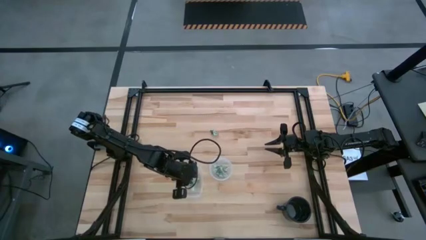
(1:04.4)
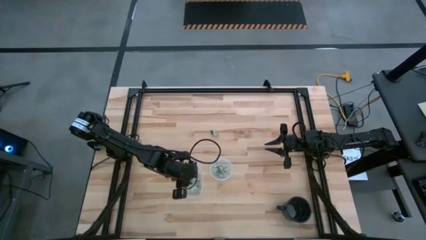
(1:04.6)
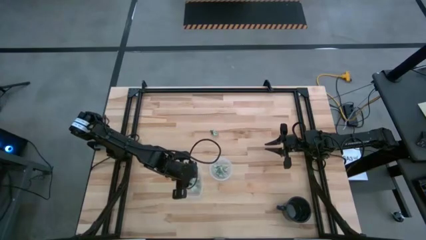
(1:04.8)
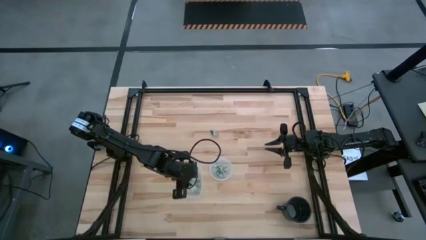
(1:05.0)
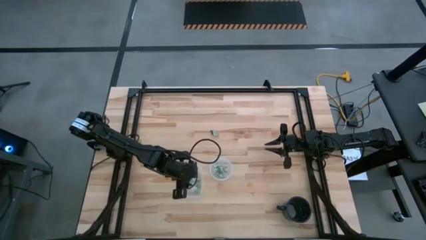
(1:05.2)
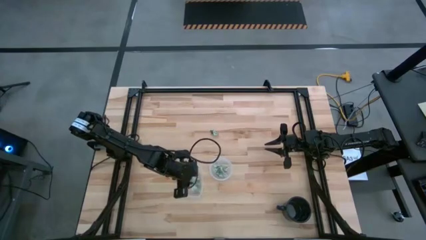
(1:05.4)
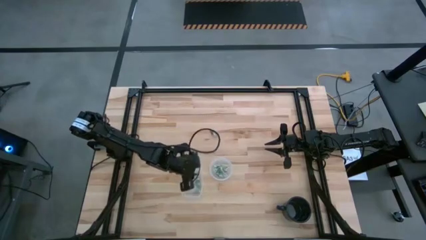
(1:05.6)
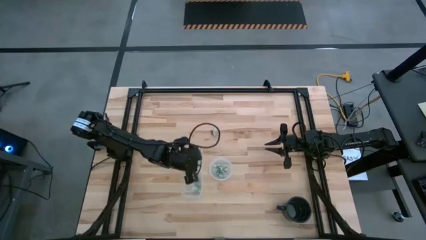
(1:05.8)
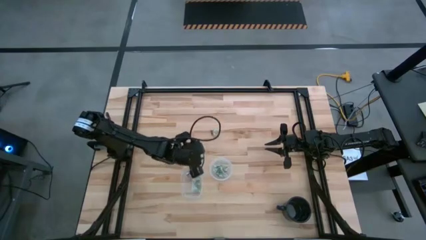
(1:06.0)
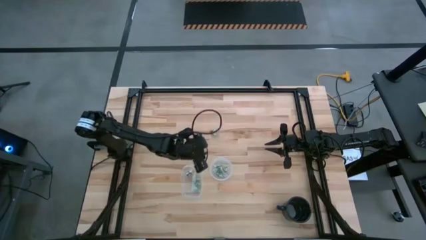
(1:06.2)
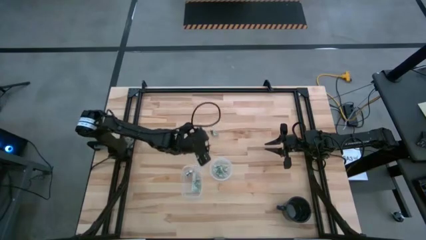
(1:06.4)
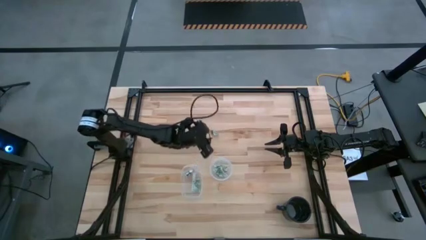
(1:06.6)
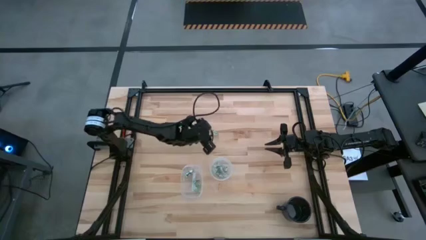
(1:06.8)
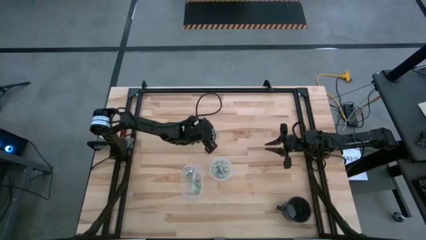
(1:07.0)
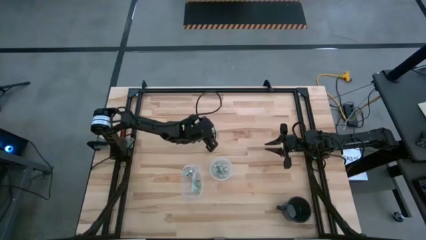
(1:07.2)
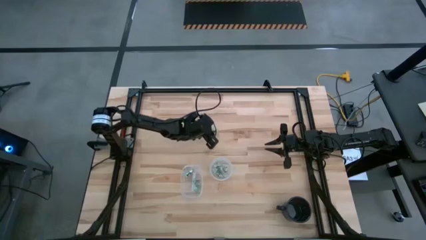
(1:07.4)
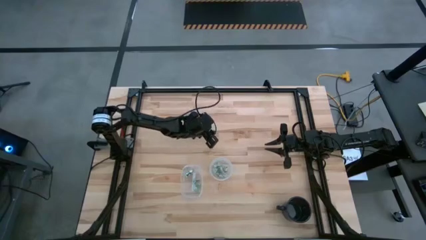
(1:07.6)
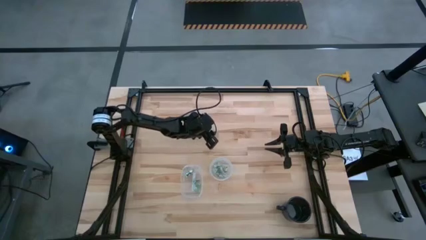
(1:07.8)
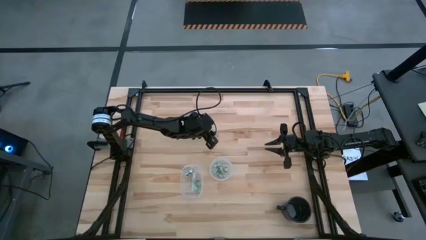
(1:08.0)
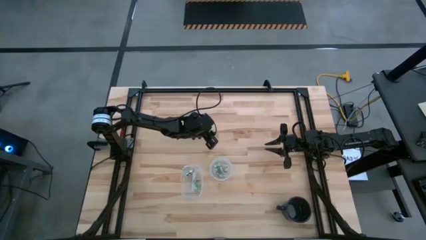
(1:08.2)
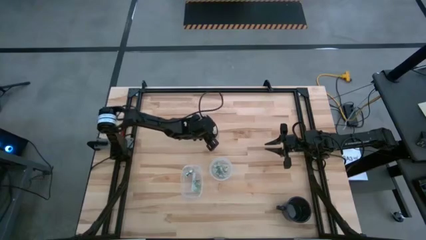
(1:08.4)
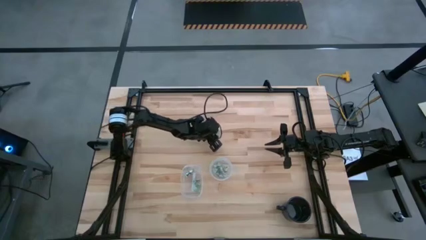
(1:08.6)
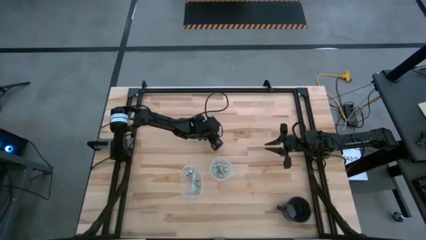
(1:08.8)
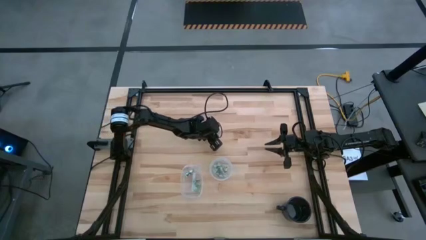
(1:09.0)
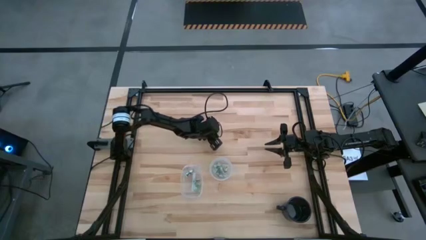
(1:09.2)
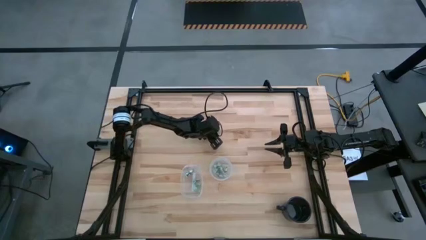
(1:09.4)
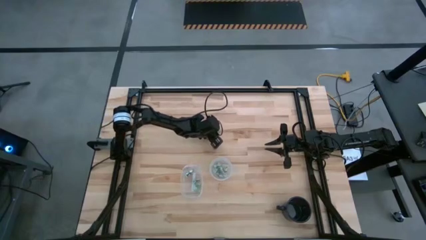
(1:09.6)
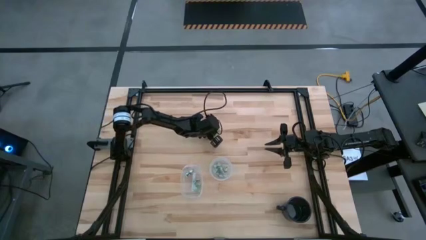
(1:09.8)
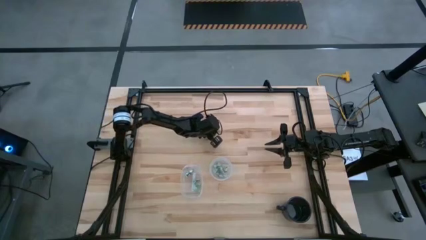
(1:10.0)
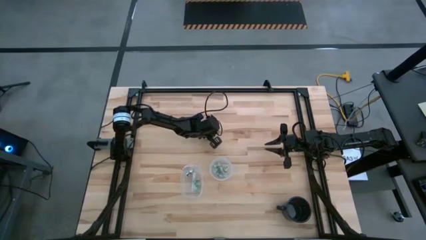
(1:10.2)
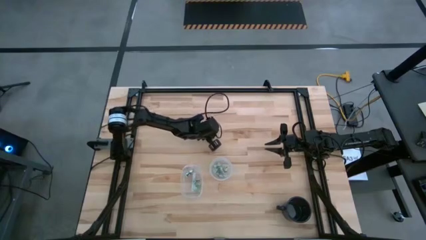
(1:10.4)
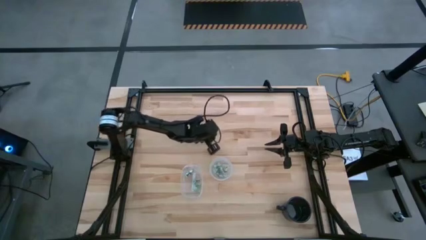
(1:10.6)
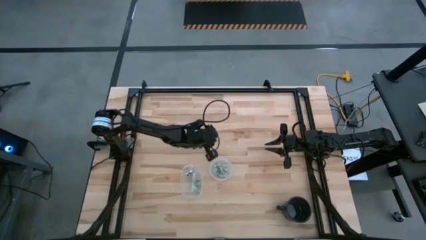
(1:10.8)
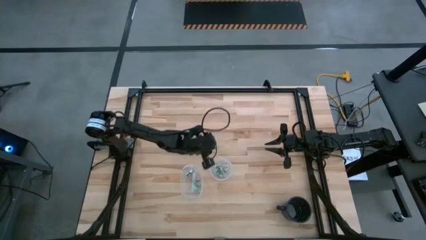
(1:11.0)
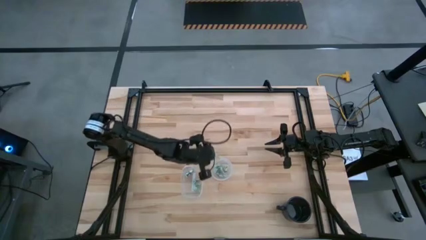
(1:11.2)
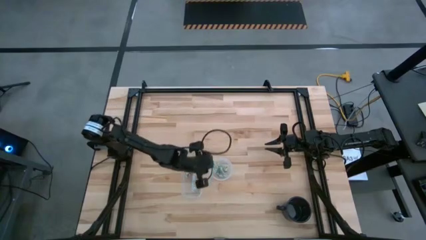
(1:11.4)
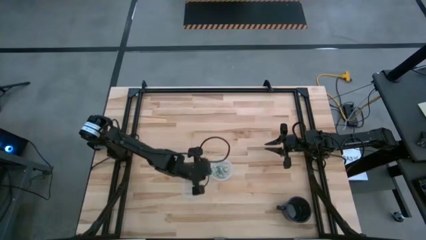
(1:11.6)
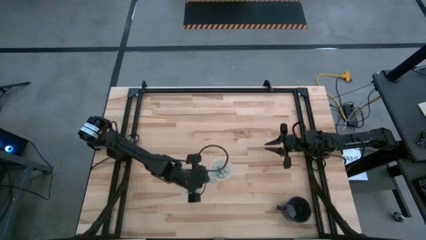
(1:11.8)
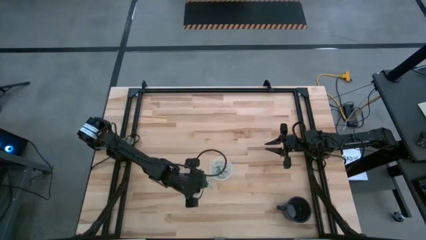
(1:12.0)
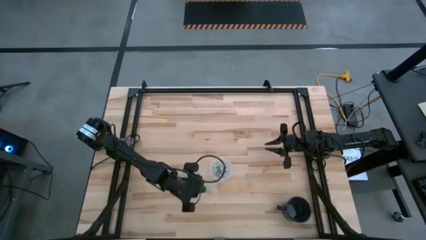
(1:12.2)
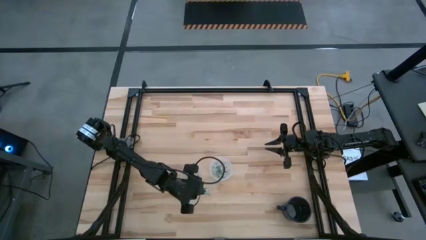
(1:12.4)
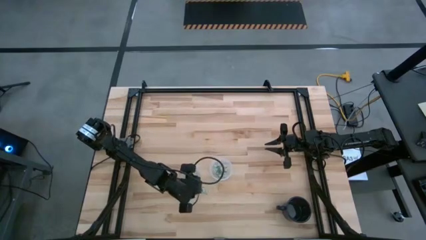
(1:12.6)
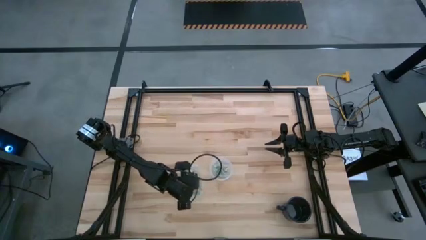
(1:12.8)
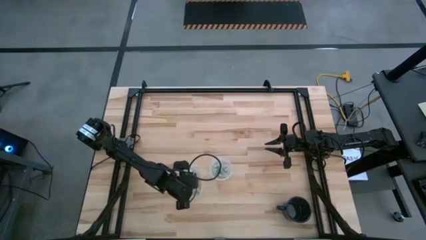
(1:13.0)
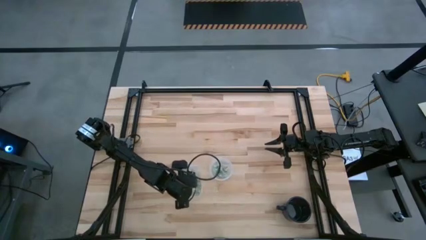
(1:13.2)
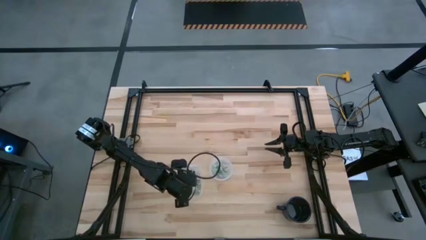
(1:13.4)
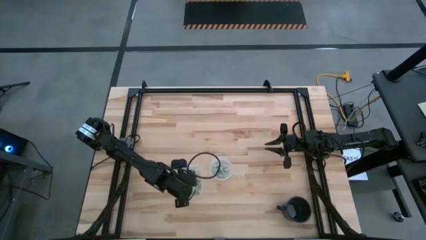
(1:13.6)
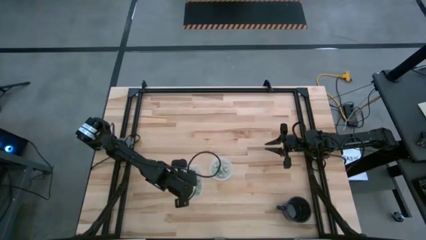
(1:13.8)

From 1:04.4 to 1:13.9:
Task: Pick and place items into bin
Put the stevia packet into the left transparent bin

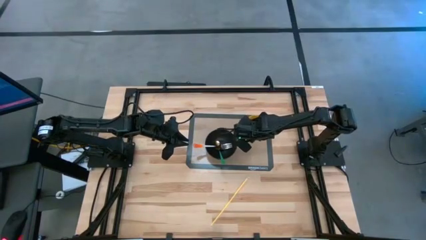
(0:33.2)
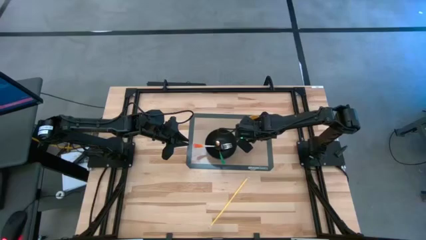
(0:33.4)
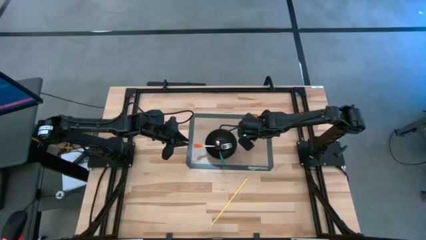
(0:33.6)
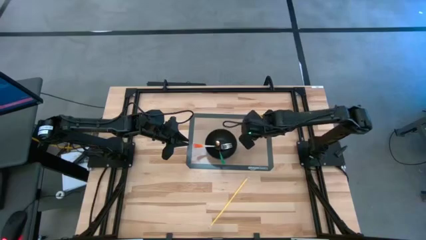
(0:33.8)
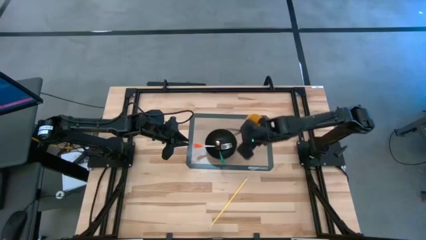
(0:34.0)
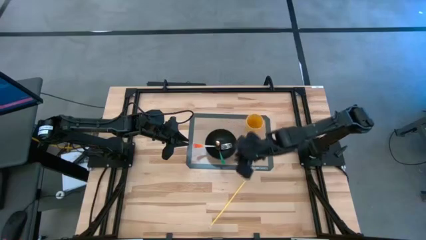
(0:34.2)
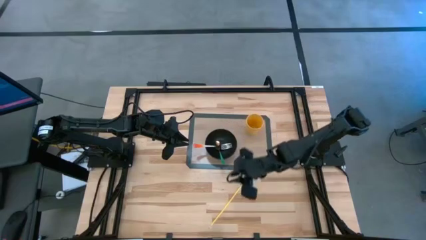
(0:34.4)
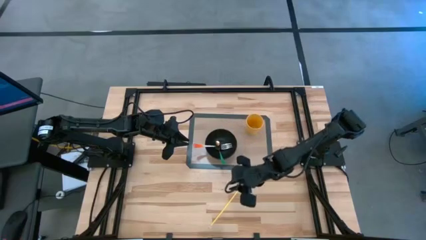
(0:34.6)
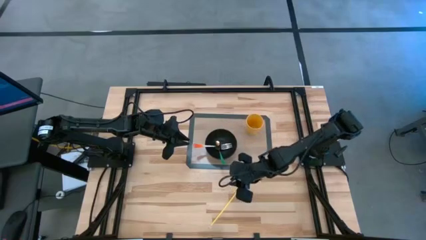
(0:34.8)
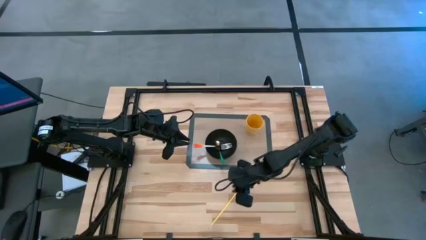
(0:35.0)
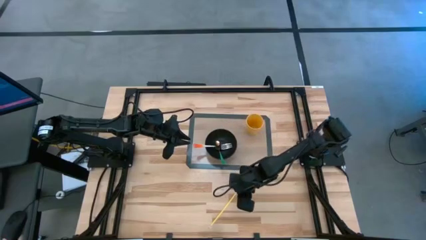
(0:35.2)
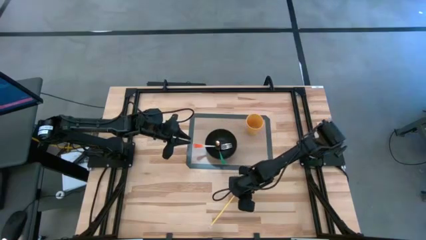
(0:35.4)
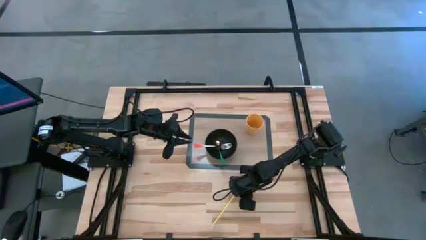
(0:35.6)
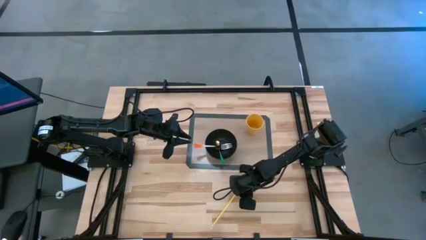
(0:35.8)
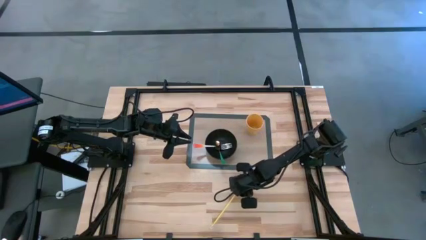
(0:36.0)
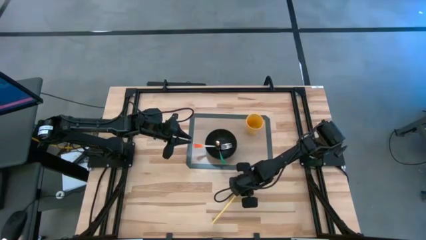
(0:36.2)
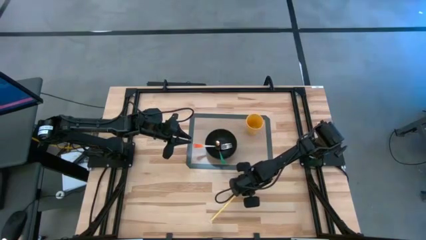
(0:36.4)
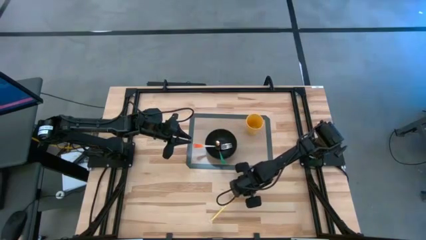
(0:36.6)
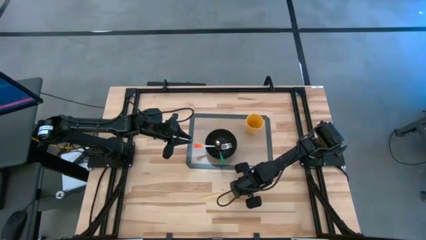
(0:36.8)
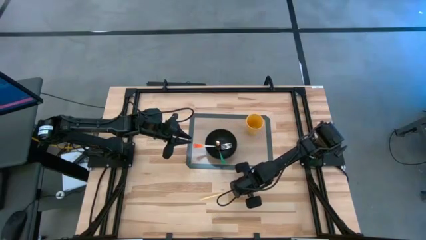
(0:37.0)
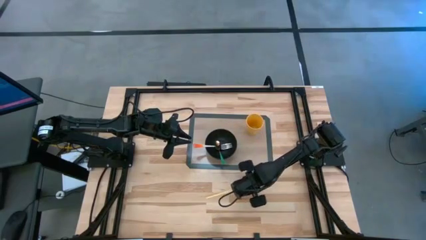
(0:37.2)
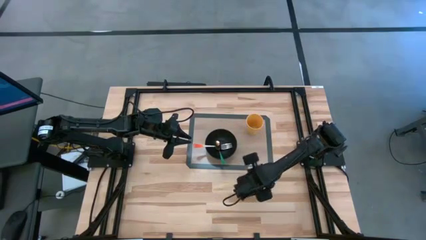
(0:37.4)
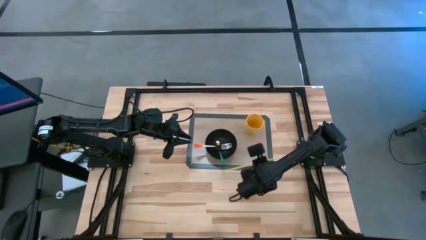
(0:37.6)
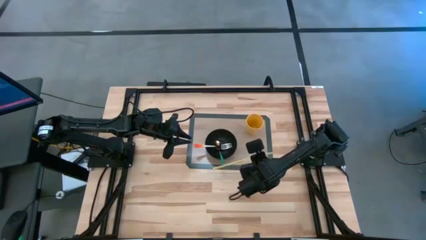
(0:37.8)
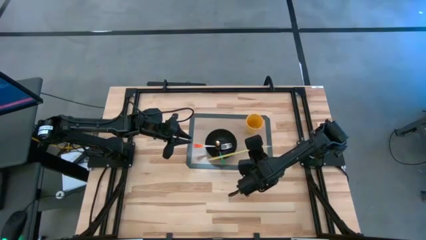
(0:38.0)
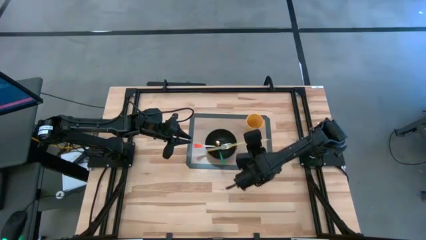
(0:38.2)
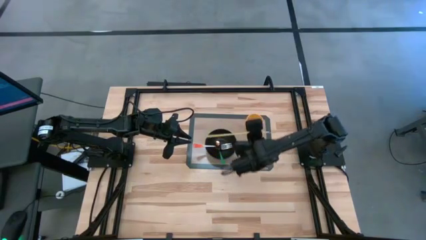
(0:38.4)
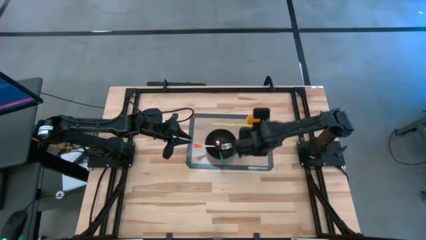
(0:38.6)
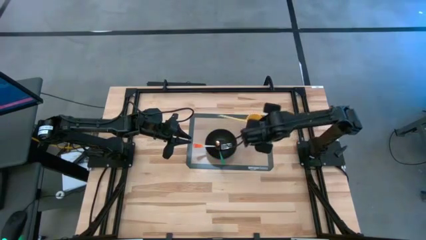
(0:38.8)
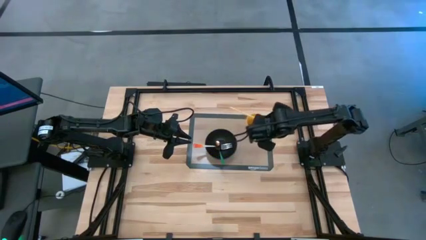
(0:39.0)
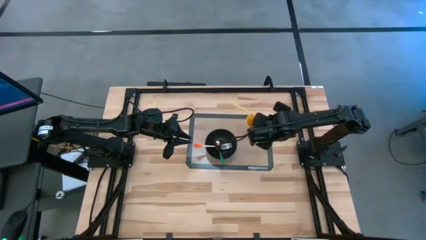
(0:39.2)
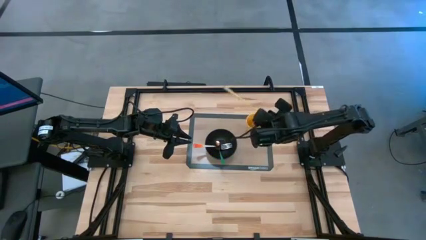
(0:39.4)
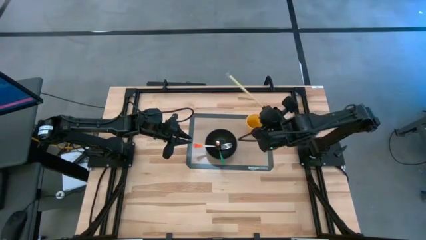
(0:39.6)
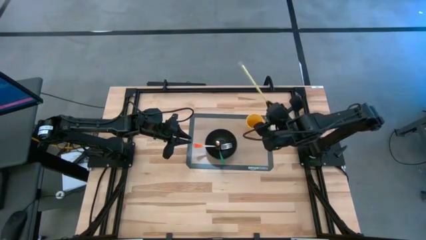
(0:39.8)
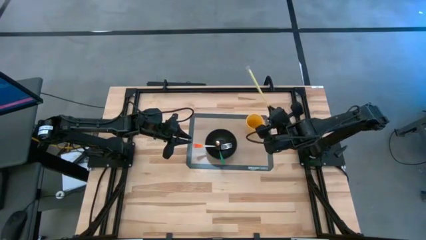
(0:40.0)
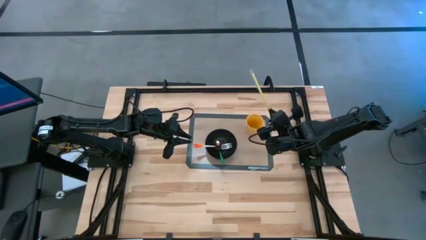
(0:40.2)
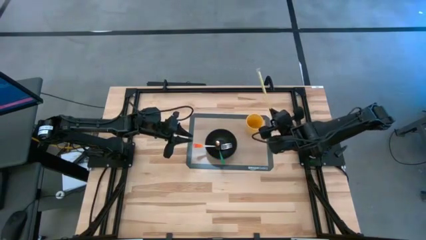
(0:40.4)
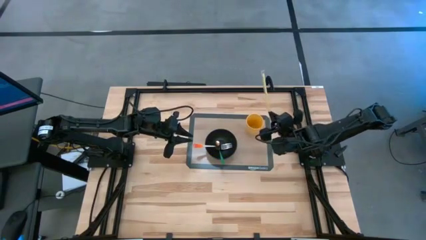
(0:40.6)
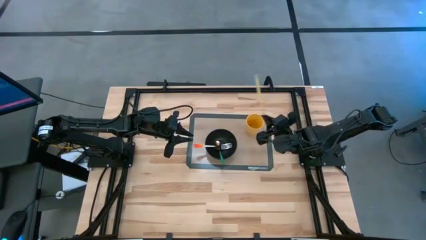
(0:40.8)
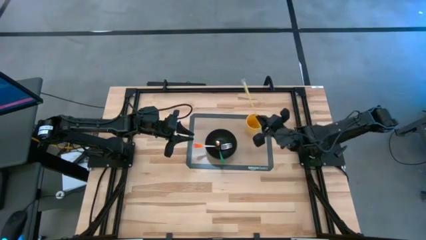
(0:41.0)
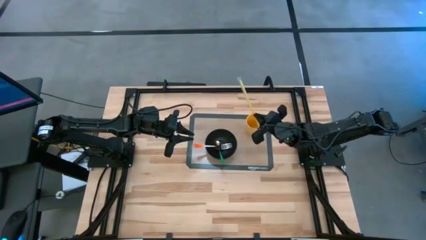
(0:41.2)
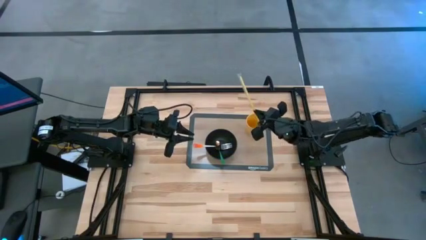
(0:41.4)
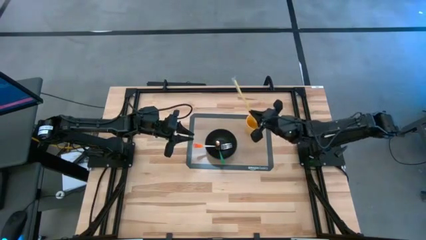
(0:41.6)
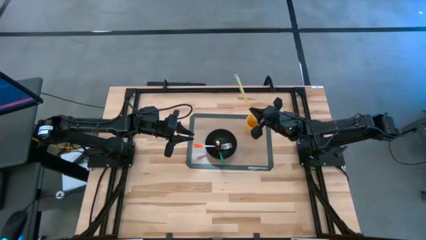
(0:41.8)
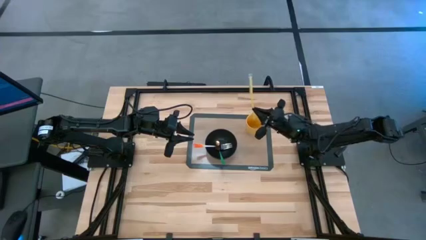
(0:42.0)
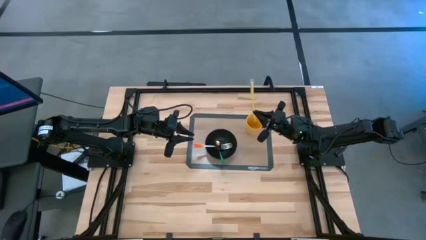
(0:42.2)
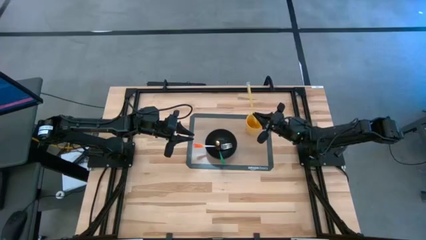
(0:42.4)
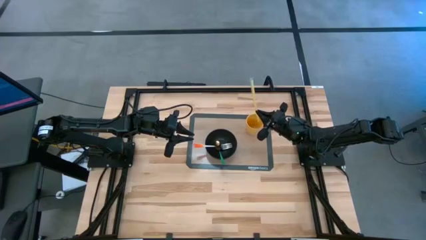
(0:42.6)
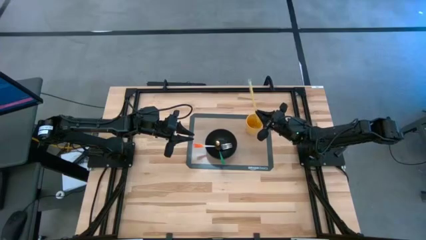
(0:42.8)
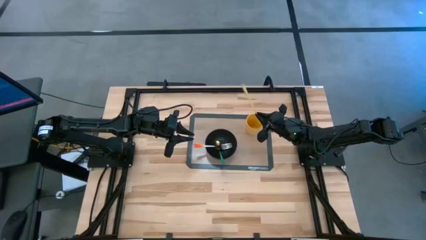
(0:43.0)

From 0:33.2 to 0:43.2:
Task: Pick & Place Utensil
Put the light yellow straw into the yellow cup on the transparent mat
